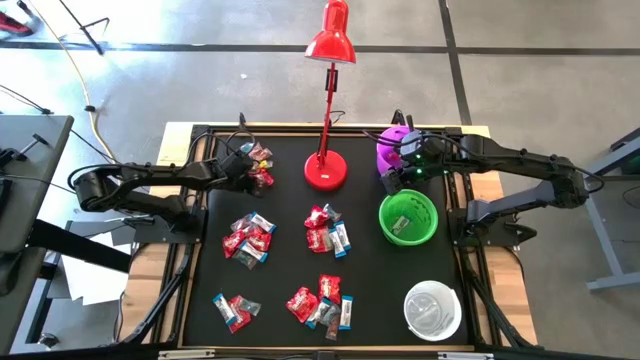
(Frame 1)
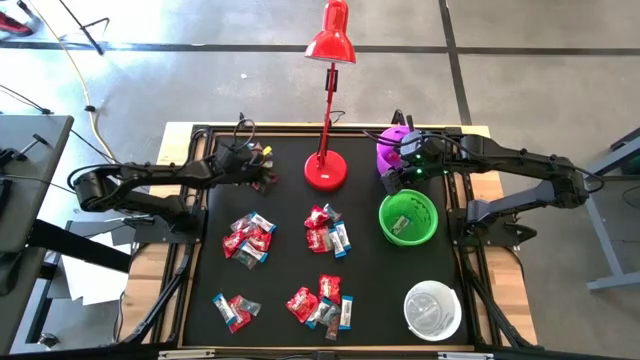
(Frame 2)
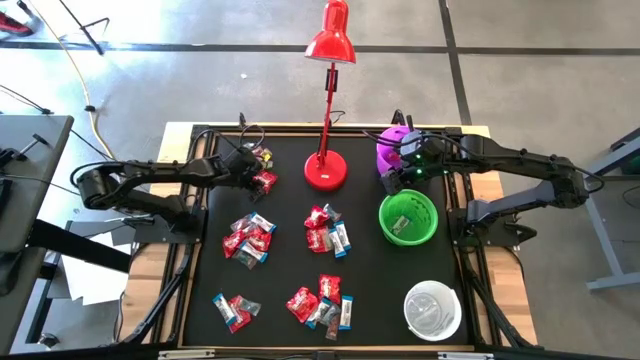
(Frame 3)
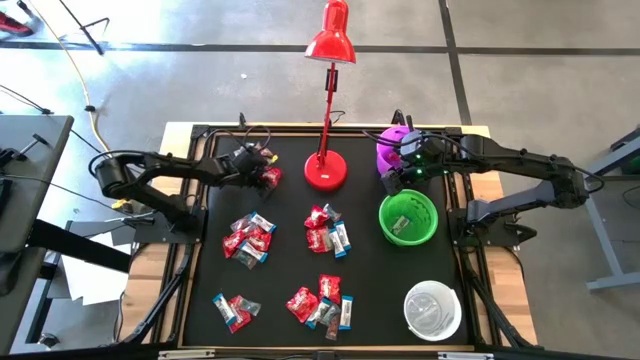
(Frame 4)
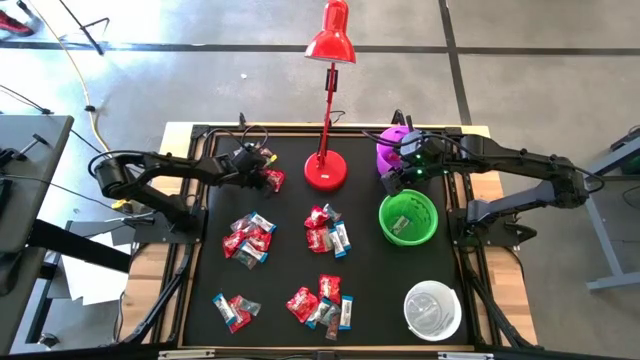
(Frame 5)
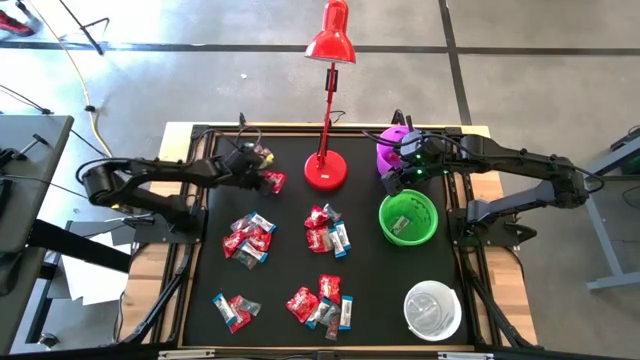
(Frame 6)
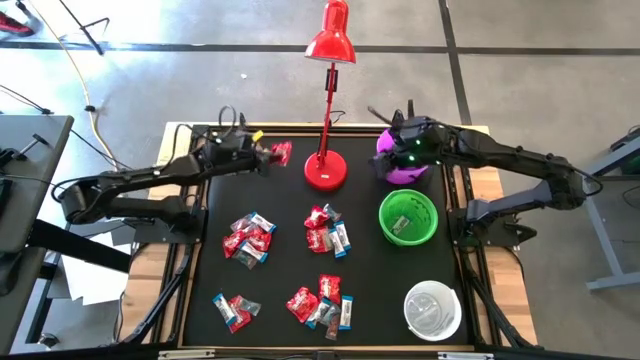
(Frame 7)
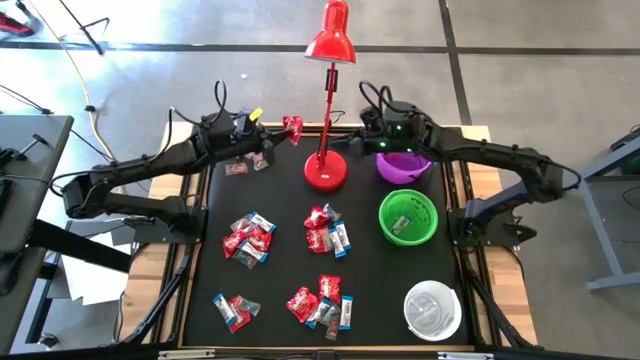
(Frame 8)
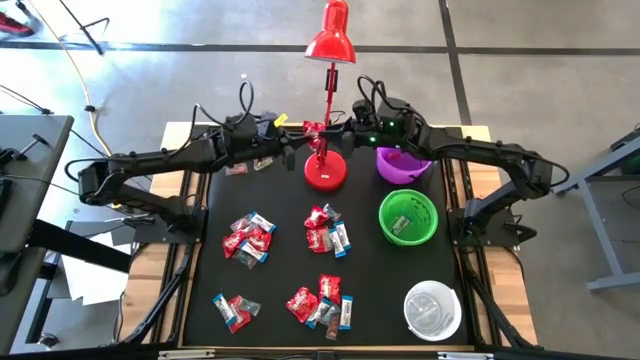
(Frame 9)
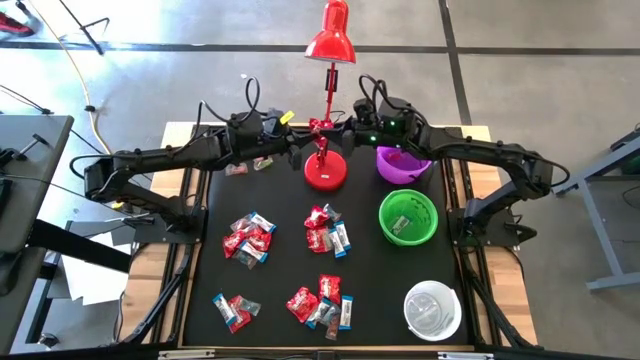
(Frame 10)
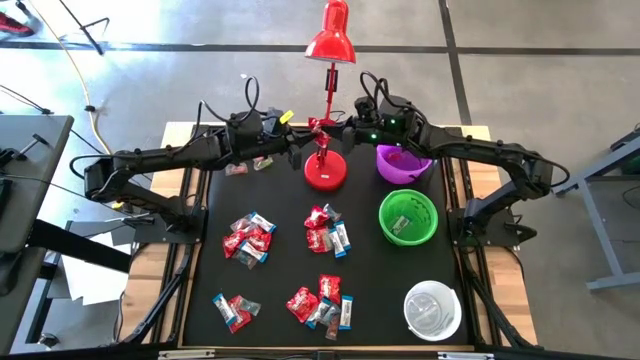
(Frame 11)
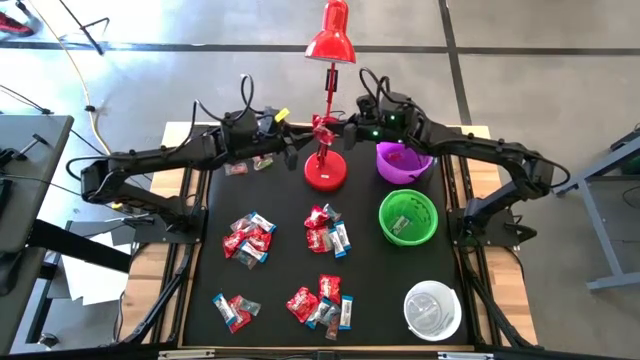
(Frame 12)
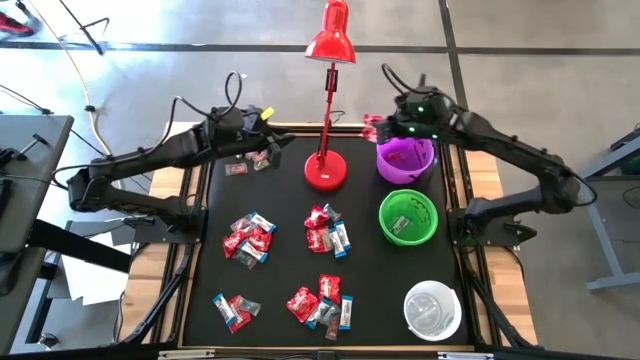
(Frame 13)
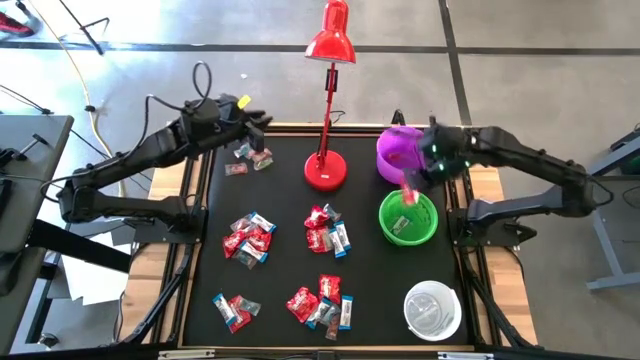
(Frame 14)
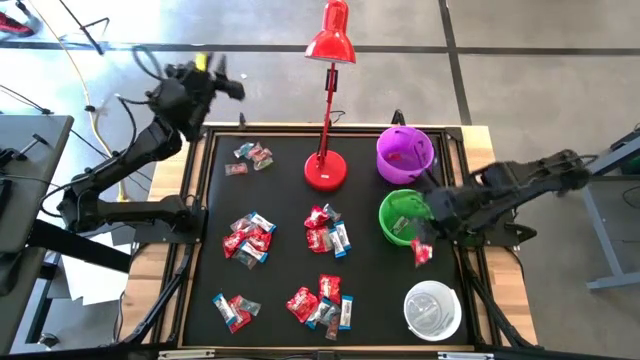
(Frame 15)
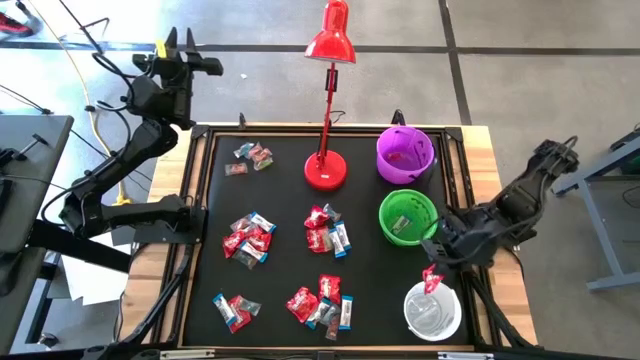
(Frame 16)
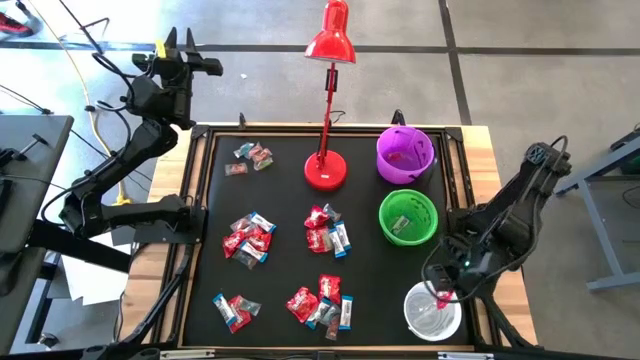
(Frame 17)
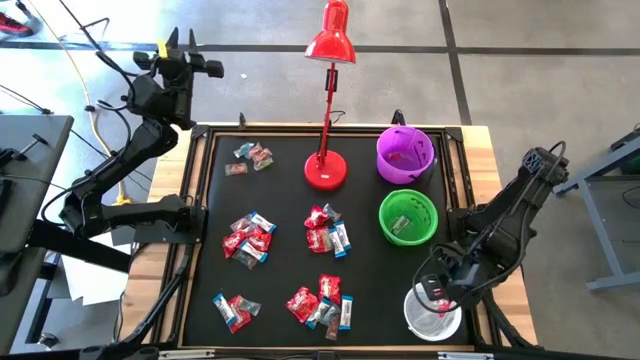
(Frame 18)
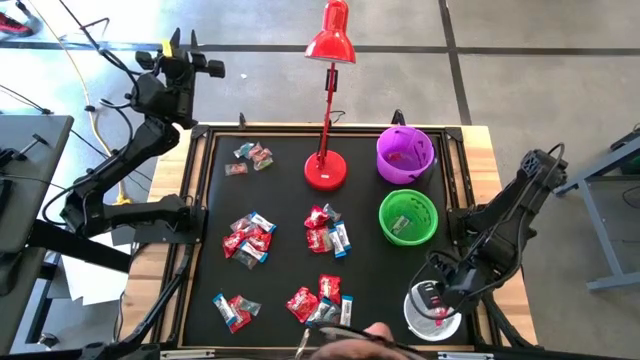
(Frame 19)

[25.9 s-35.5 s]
Task: Organize candy in baskets
Put the red candy into the white bucket

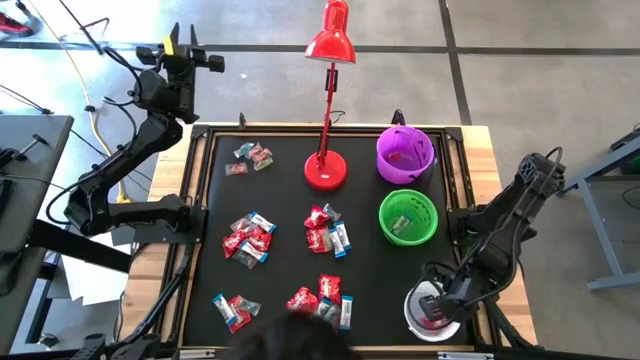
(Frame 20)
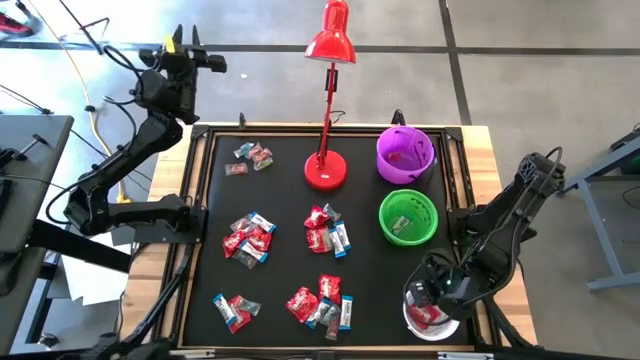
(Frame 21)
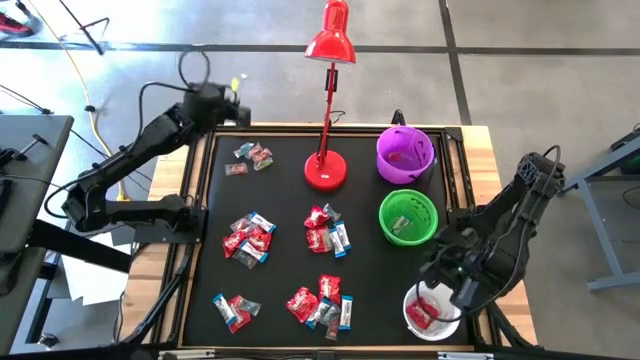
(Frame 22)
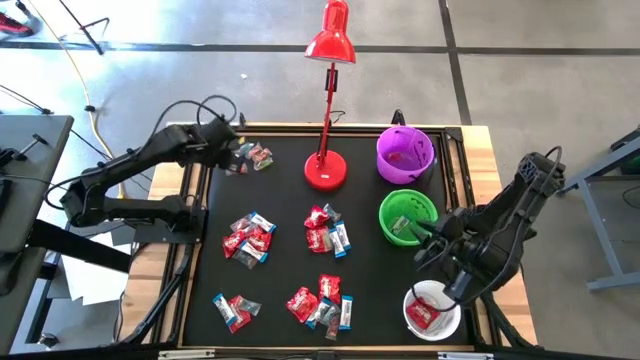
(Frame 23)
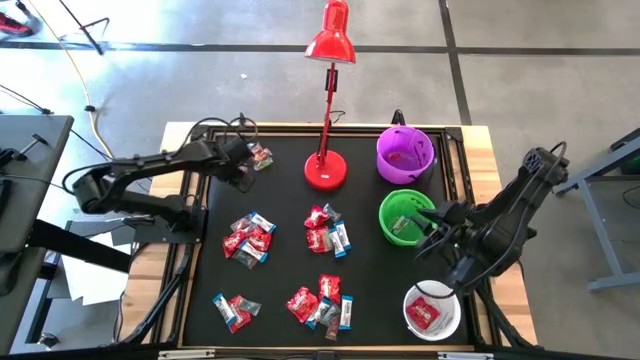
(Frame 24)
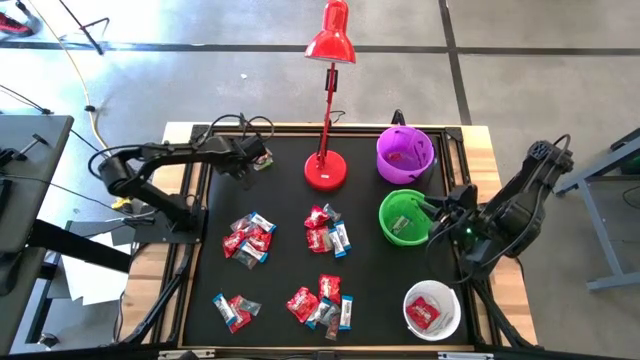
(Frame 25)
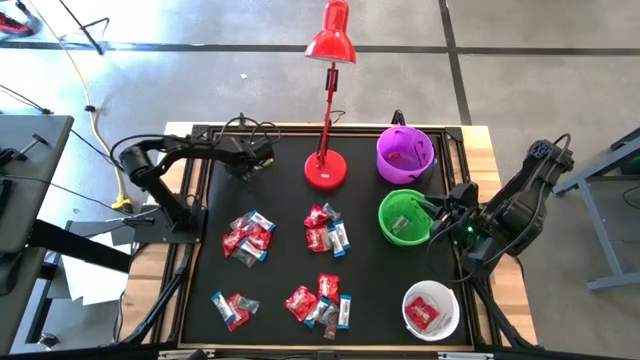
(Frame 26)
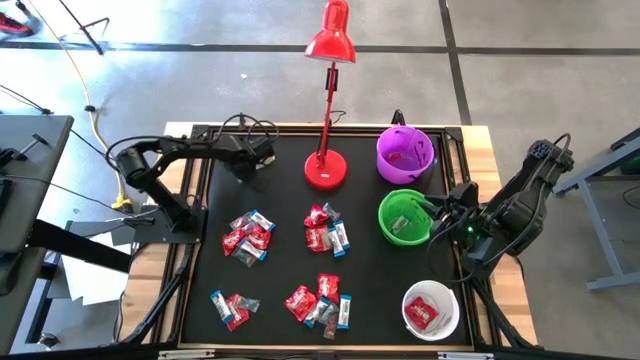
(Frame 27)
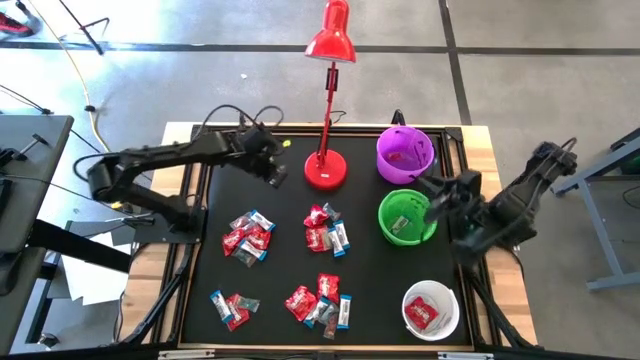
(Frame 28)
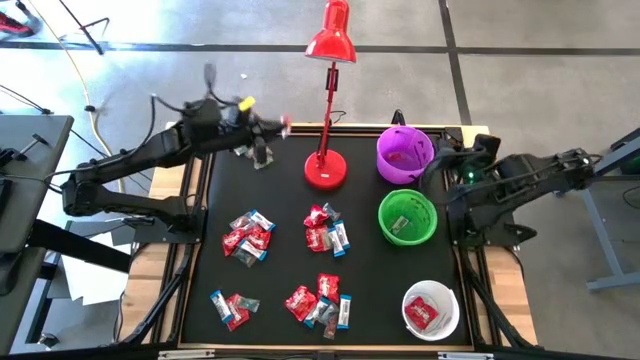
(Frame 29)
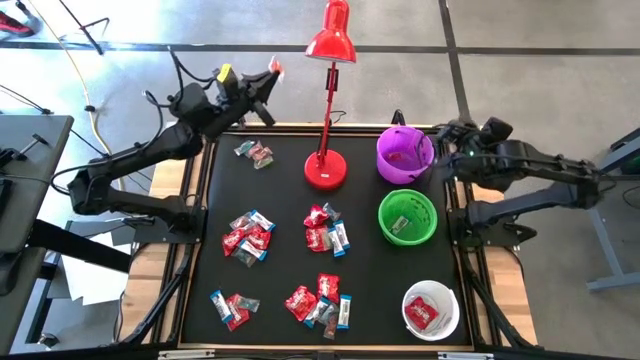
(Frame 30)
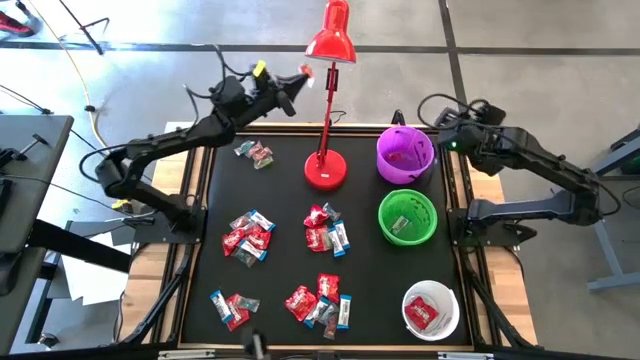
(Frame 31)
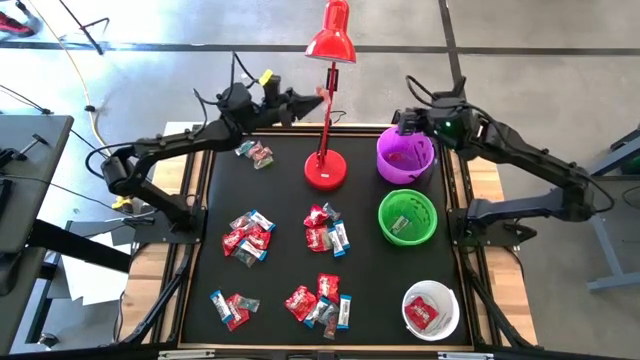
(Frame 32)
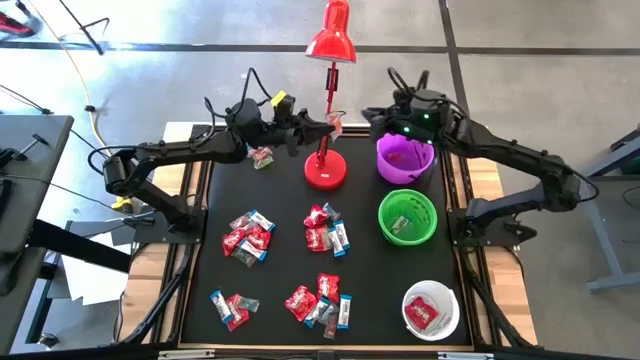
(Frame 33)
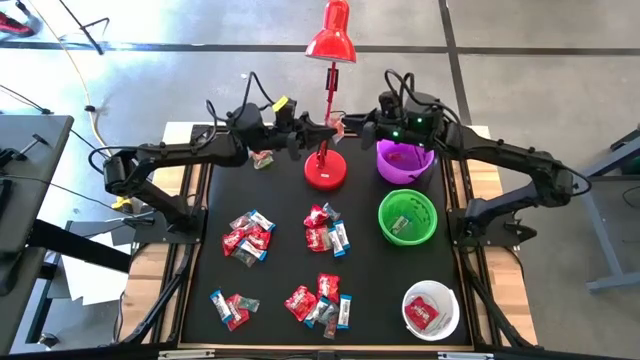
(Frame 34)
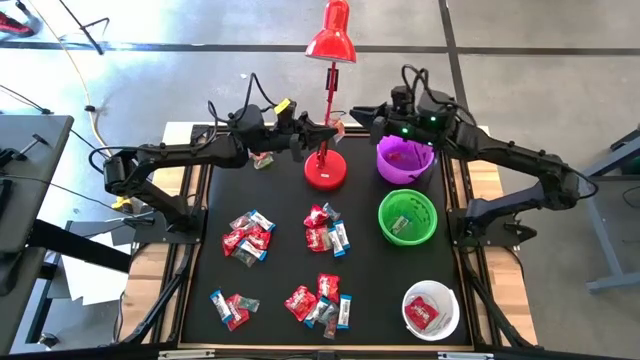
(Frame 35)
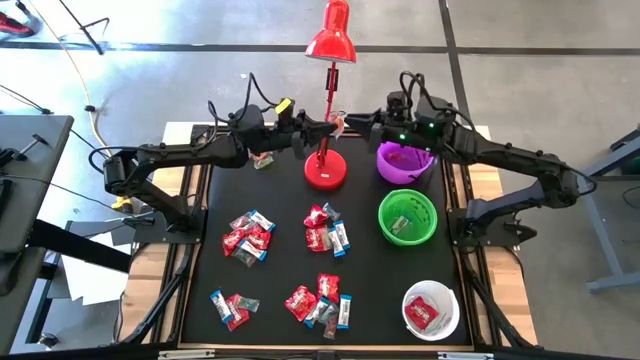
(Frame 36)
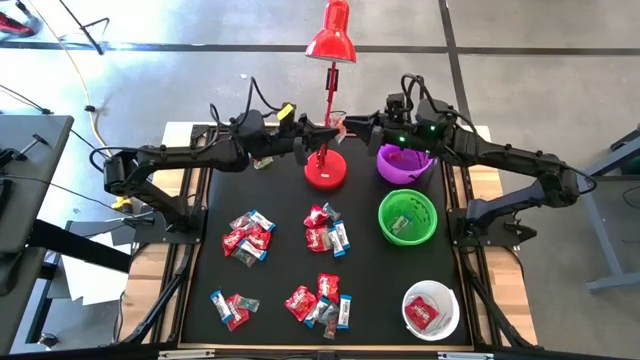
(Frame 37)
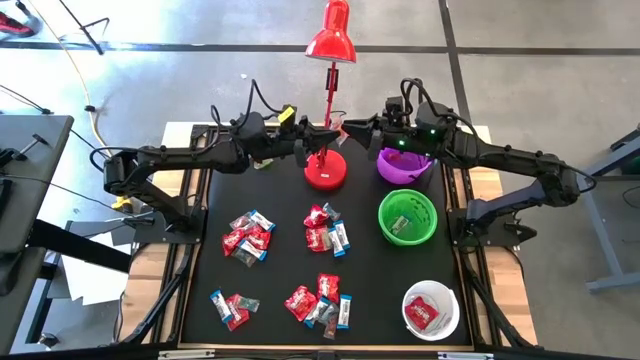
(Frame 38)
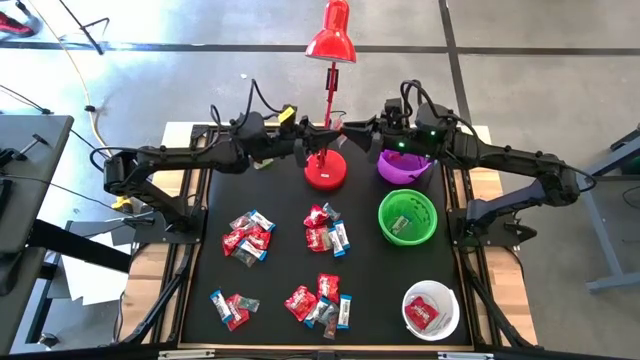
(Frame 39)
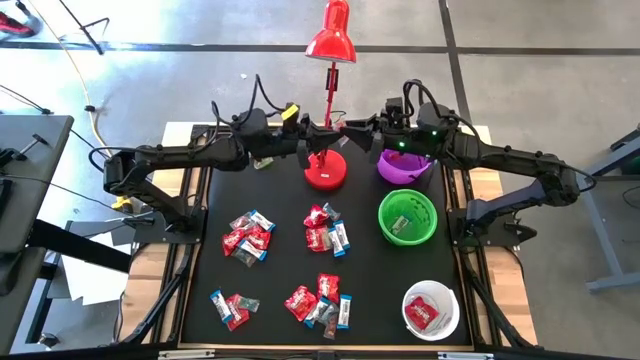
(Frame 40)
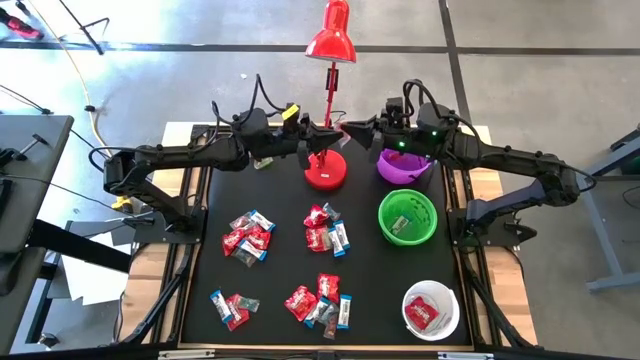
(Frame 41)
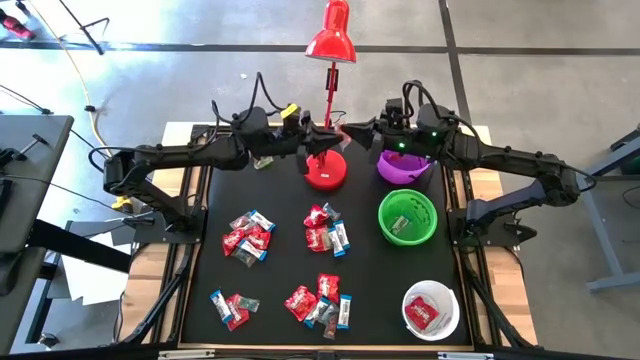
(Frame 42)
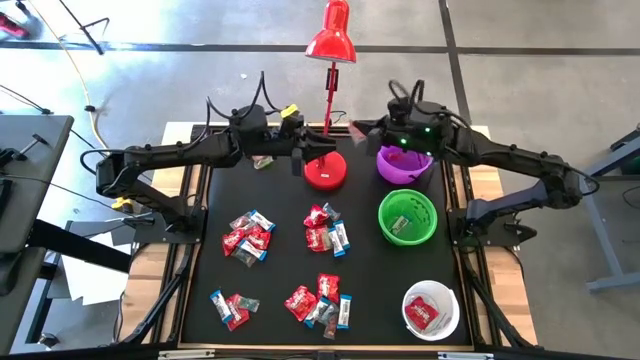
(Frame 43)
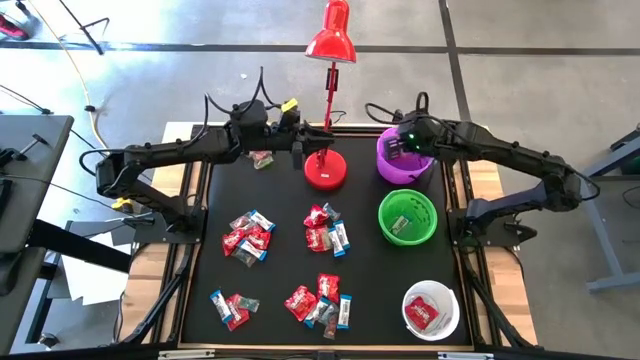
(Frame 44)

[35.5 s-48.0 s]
Put the orange gummy into the violet bucket
